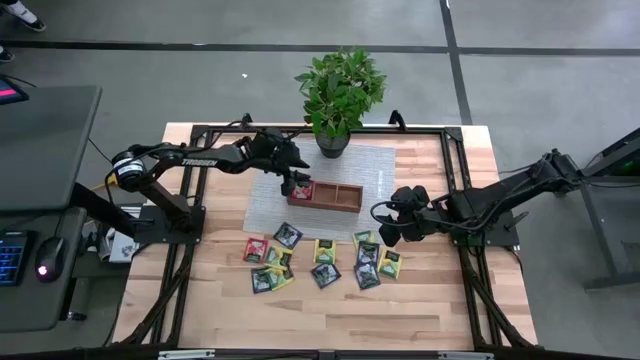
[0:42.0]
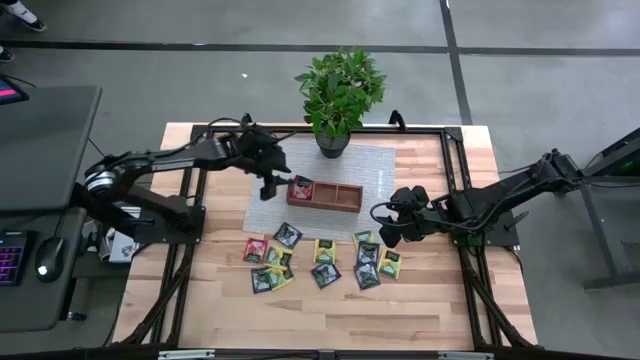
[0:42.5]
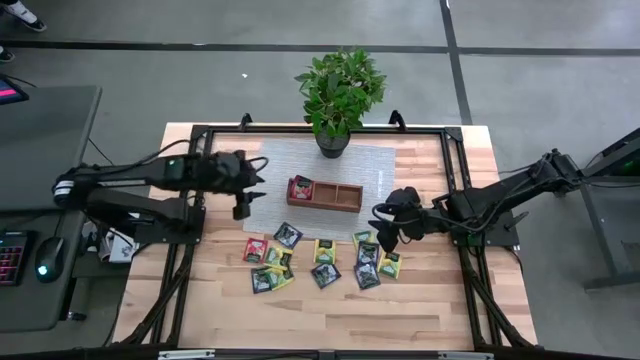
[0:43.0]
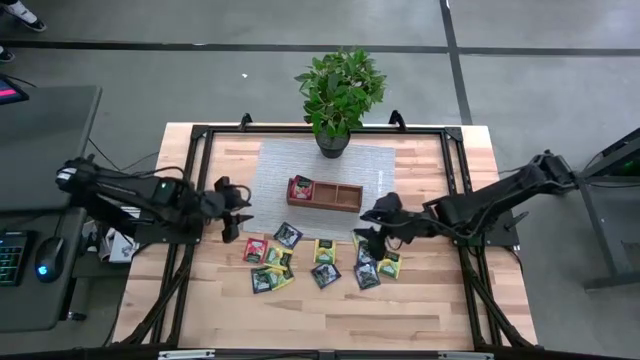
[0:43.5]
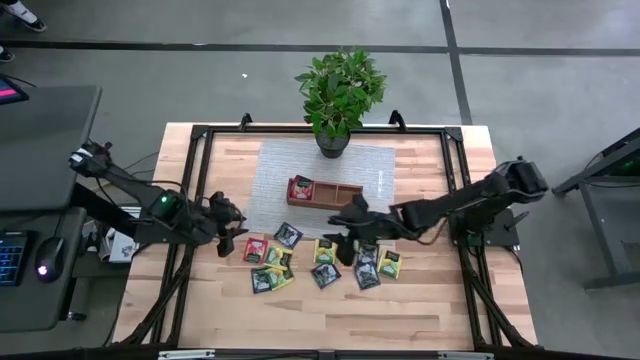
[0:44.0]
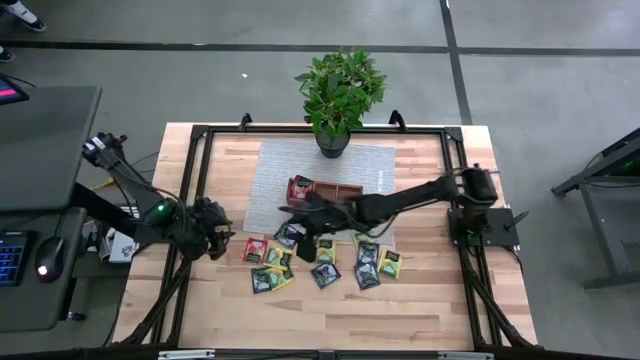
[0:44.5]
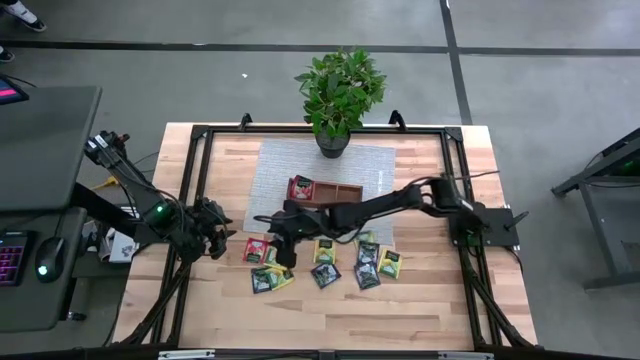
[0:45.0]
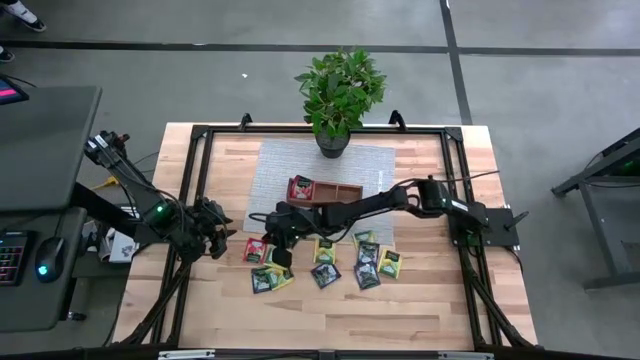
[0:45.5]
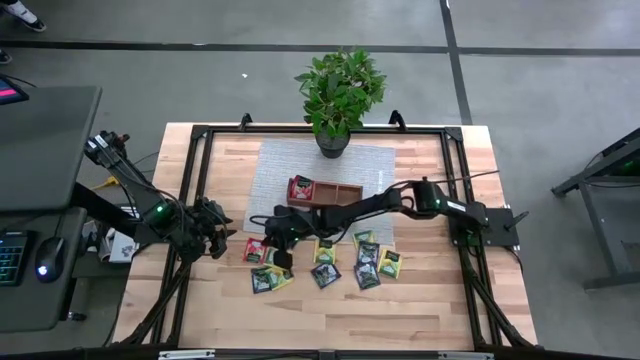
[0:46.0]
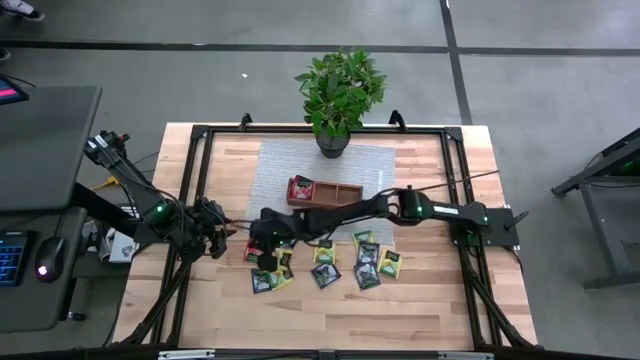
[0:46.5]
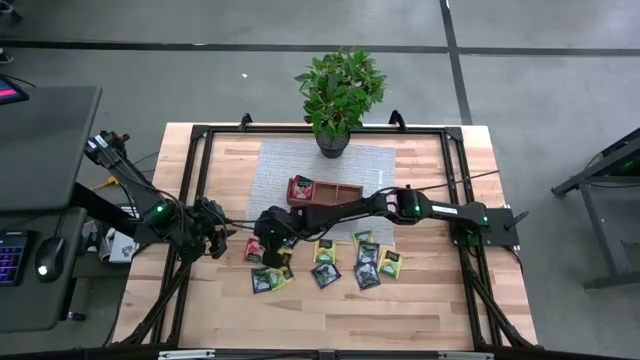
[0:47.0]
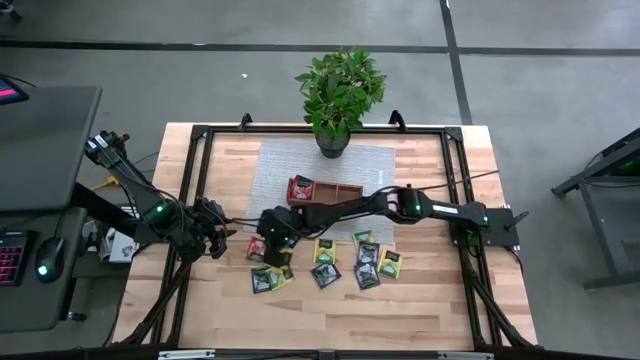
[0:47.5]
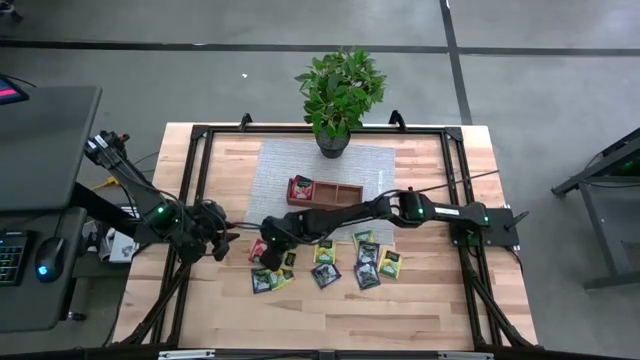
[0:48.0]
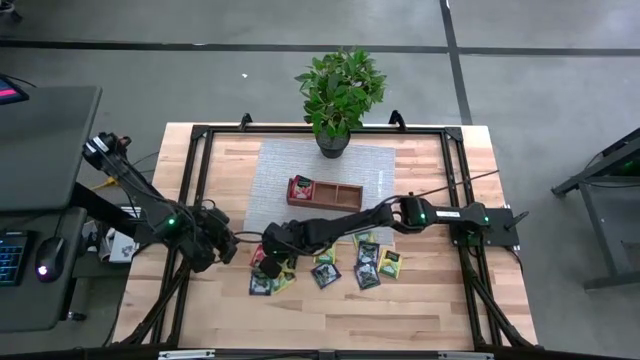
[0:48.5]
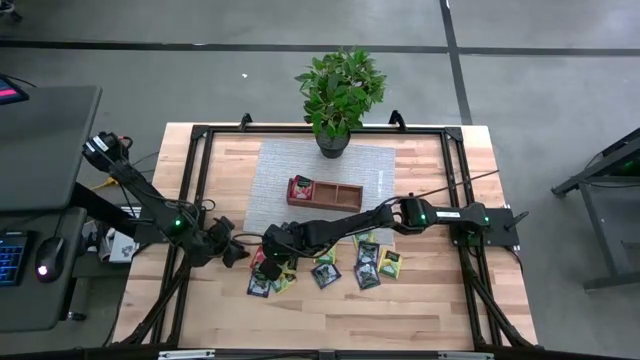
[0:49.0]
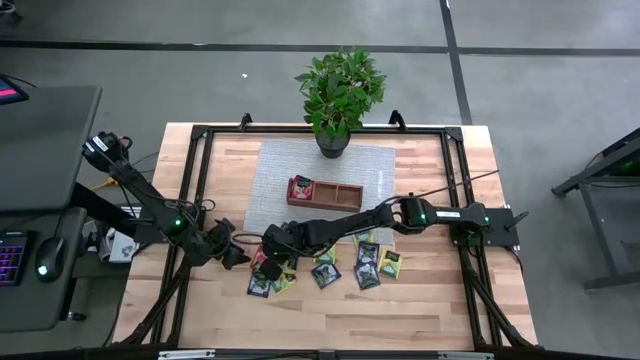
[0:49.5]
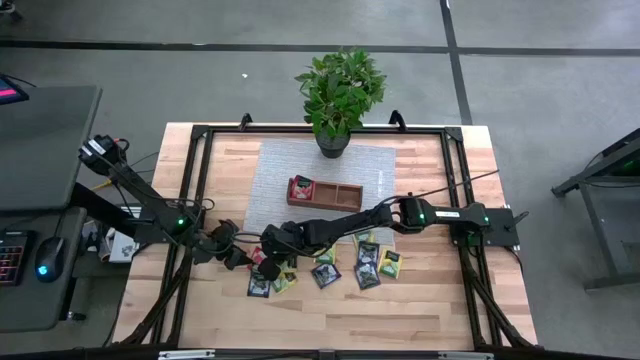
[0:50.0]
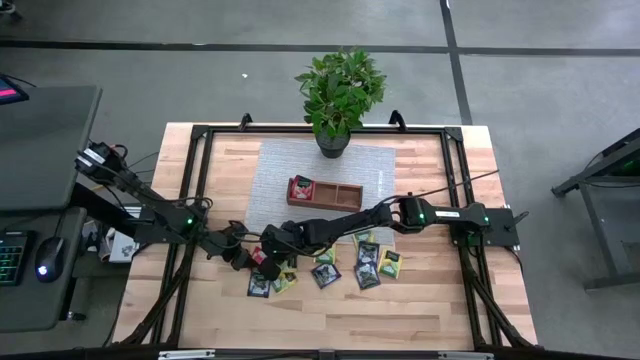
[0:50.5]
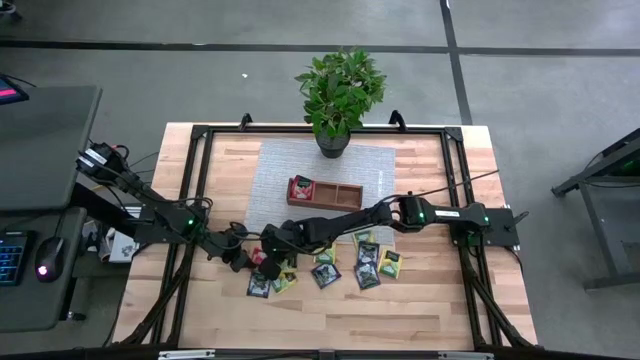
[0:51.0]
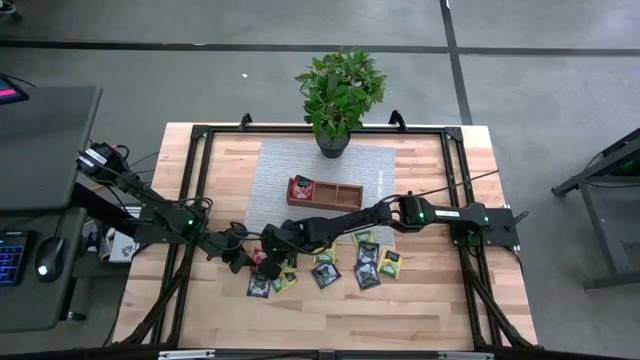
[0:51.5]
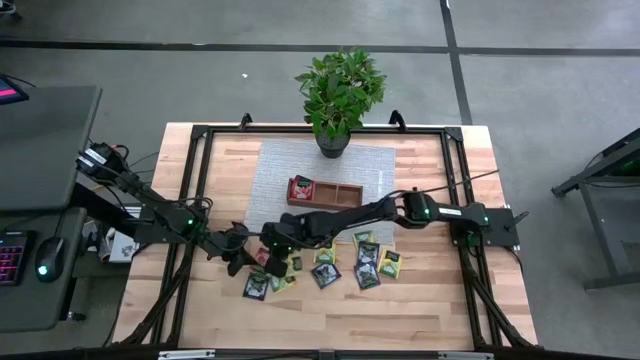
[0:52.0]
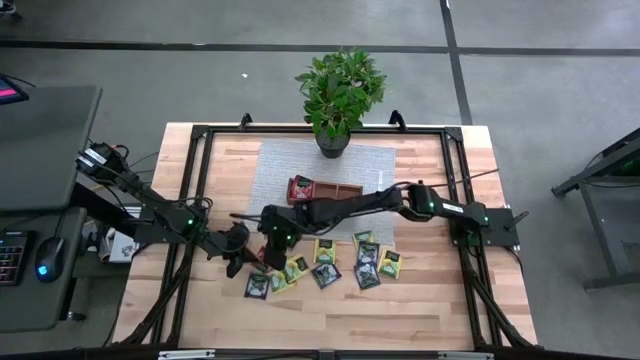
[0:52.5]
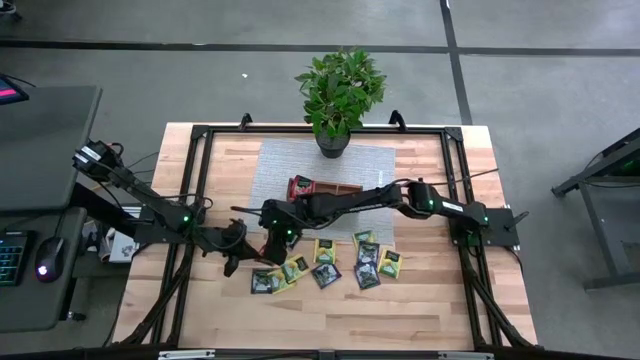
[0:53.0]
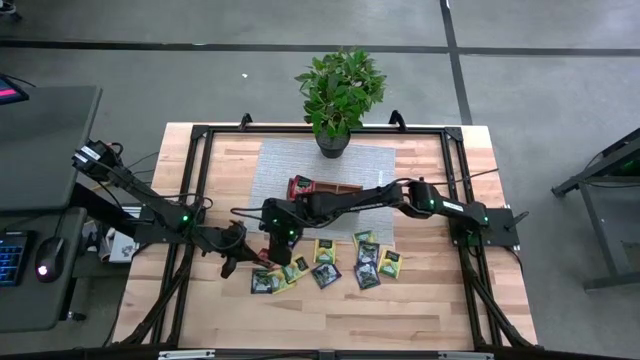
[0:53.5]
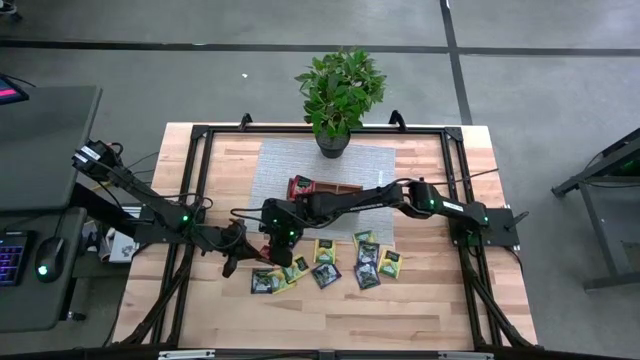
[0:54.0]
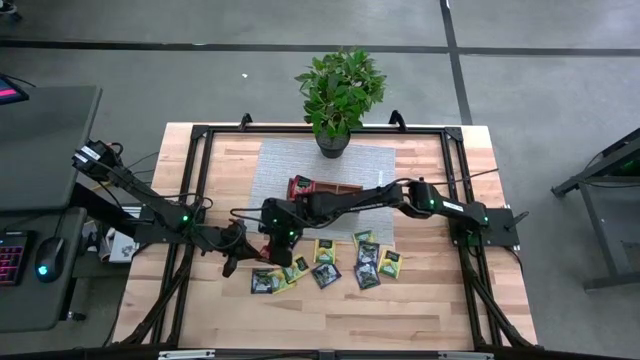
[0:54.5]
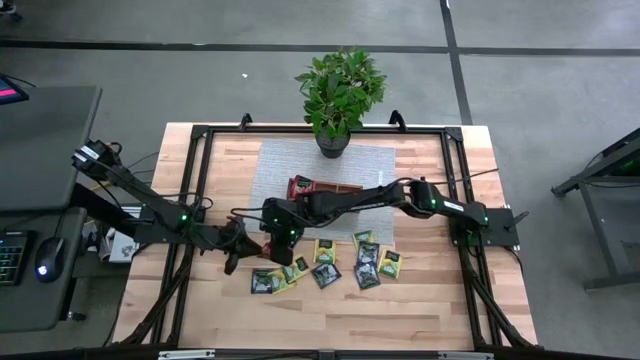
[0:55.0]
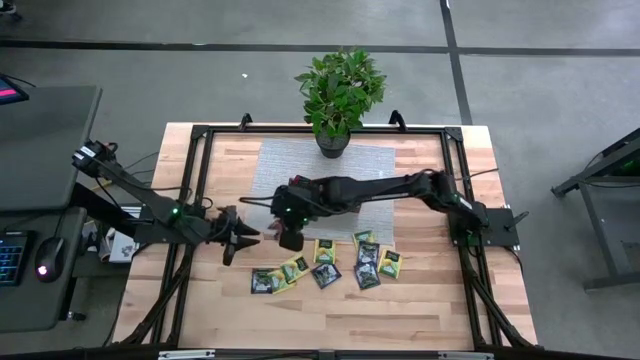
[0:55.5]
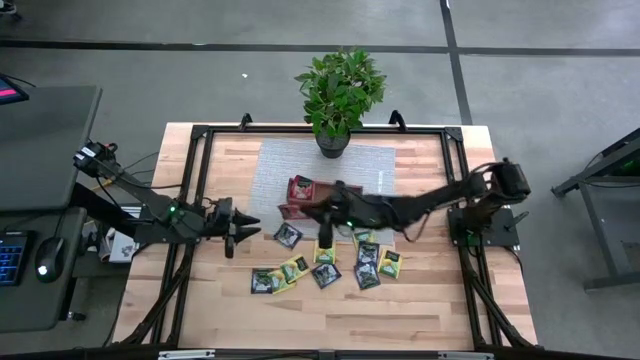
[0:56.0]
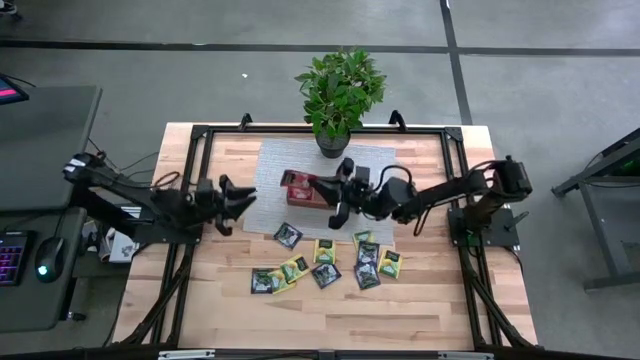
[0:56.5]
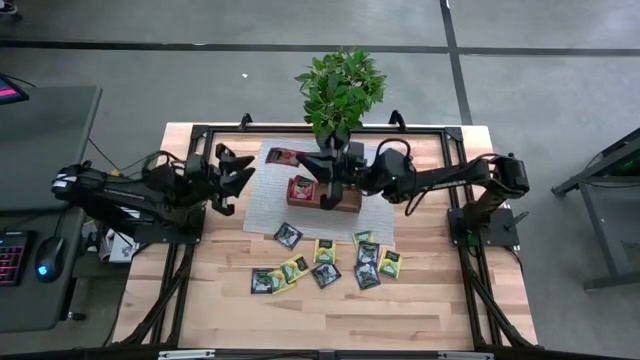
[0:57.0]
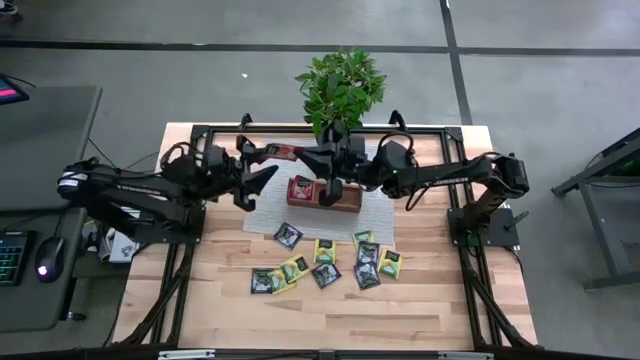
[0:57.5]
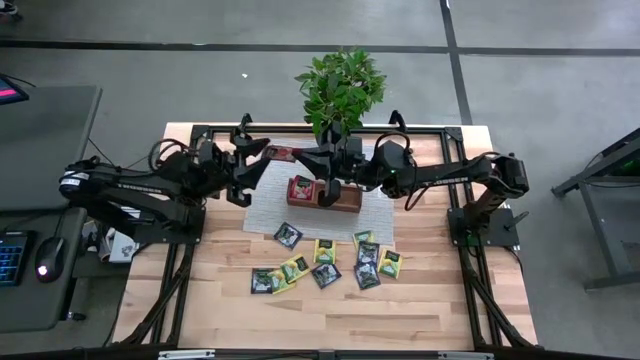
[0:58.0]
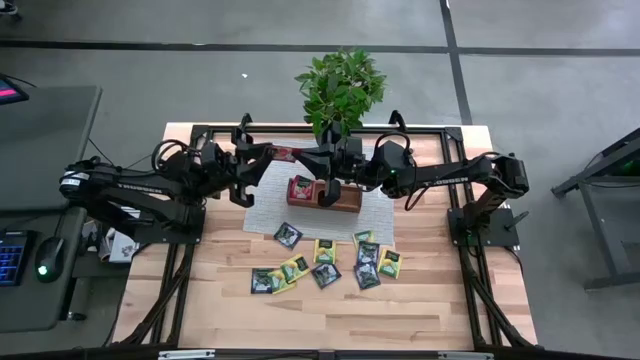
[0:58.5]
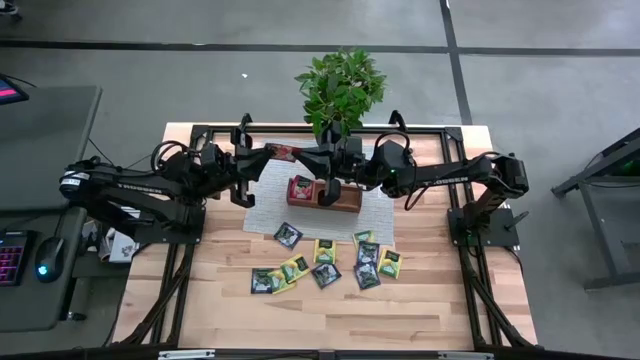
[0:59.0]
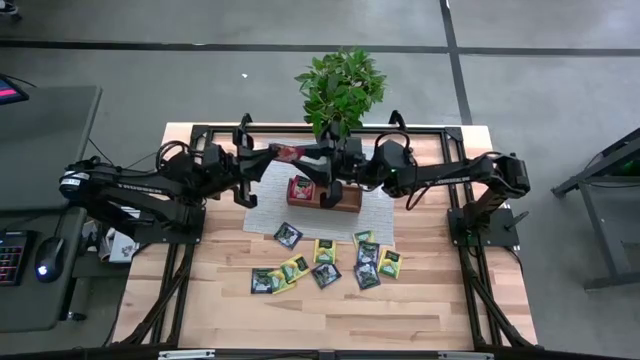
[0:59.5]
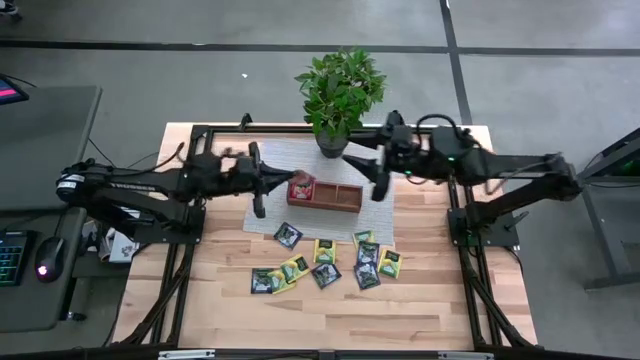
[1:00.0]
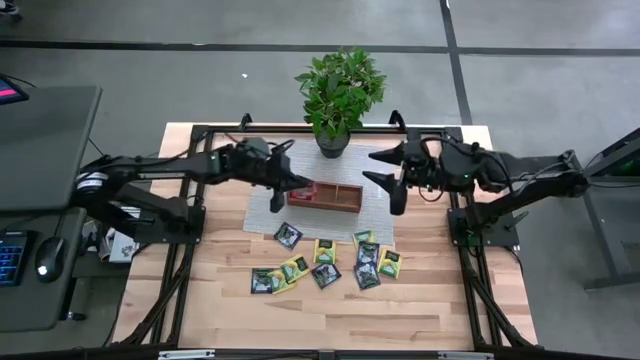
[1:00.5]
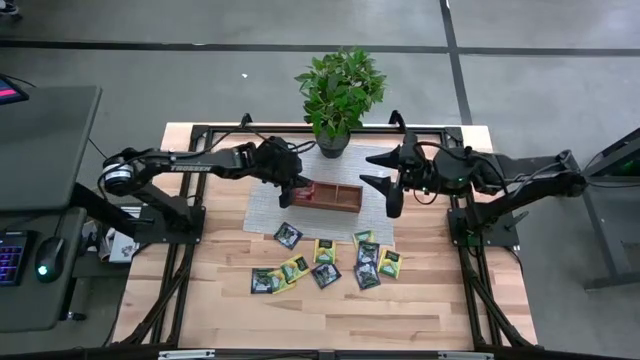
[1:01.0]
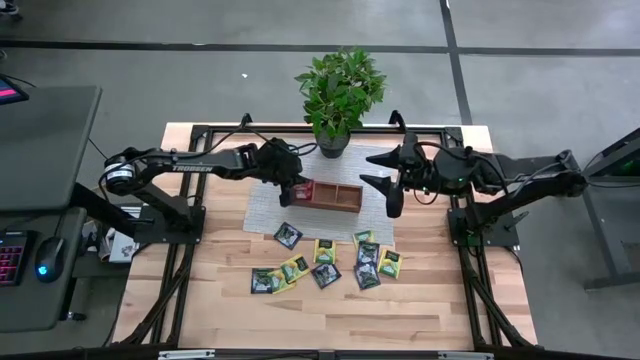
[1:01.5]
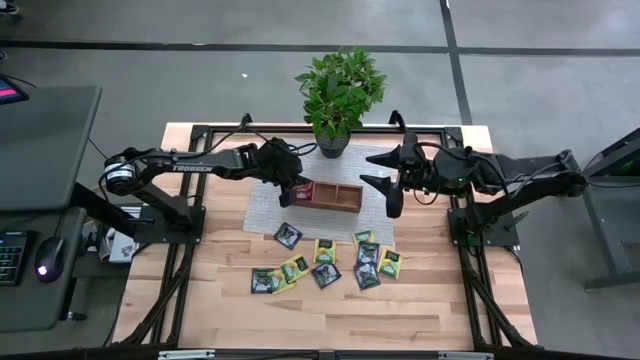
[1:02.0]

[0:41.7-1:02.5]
Task: Pick & Place Tea
Put the red tea bag into the left section of the wooden organizer
